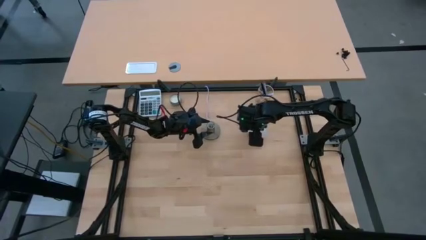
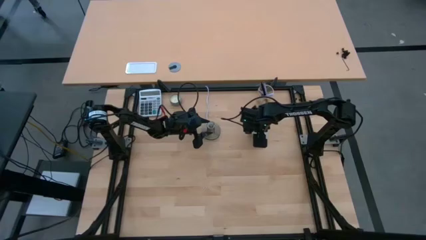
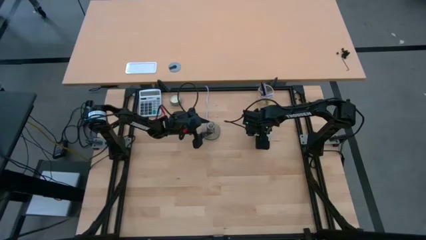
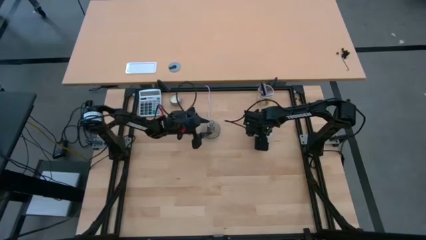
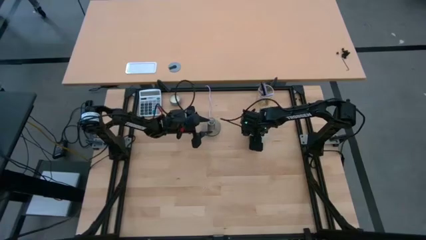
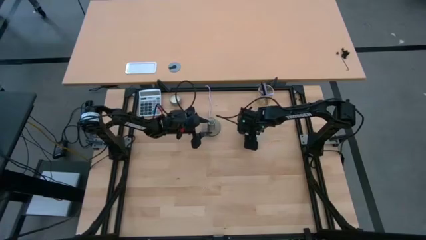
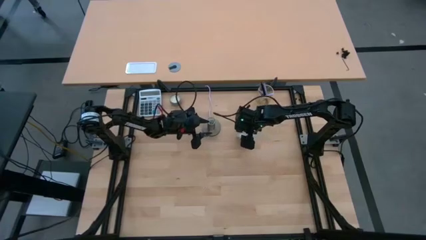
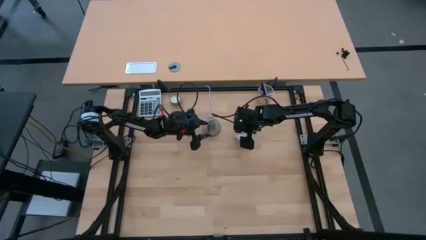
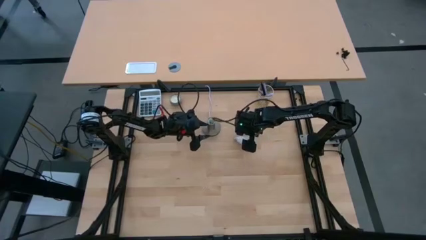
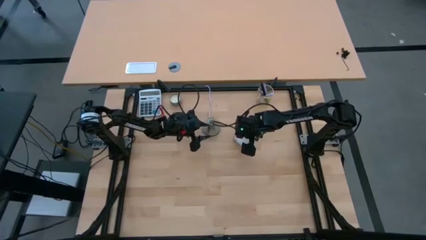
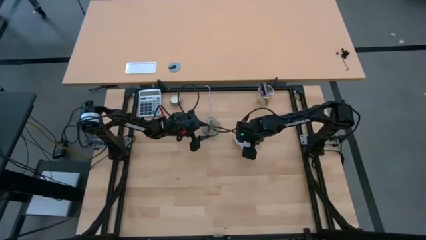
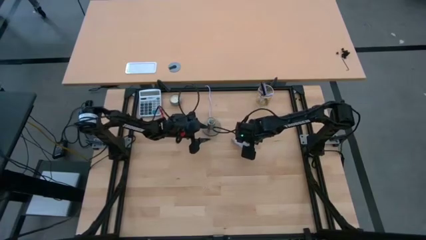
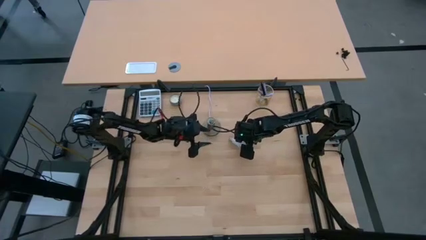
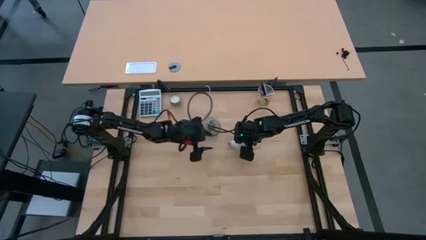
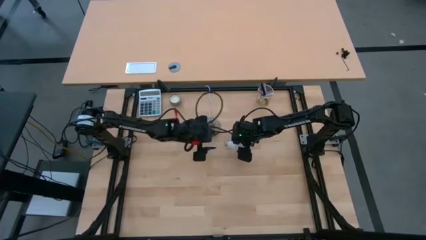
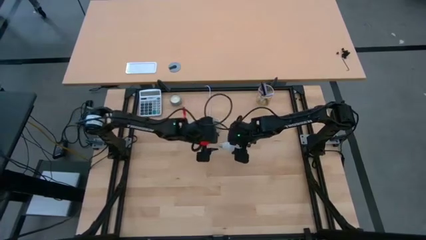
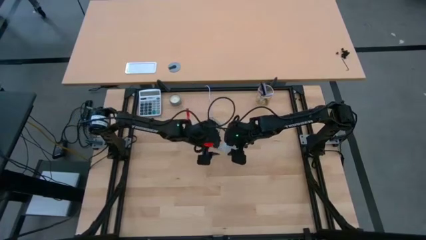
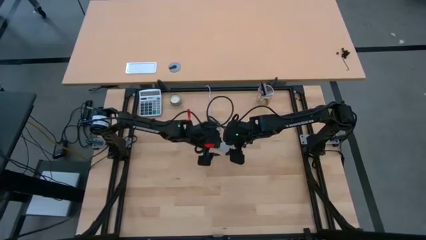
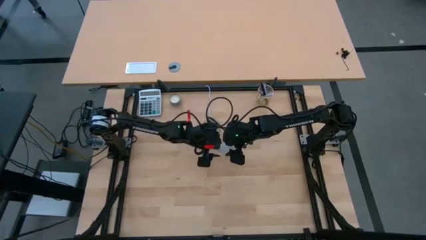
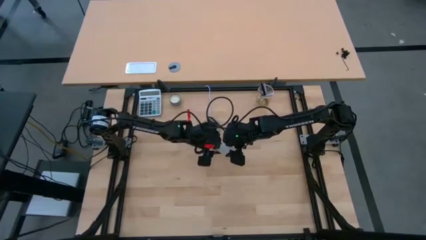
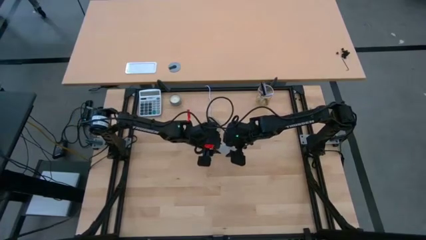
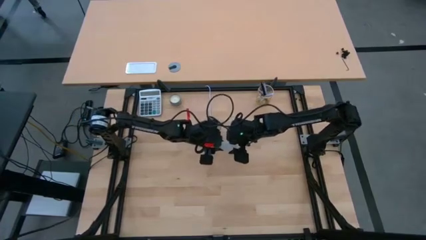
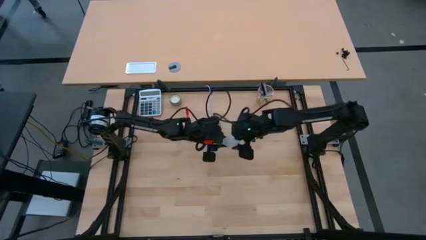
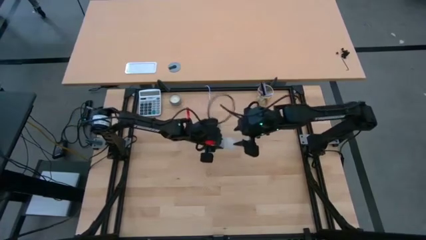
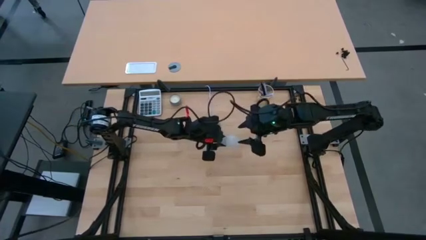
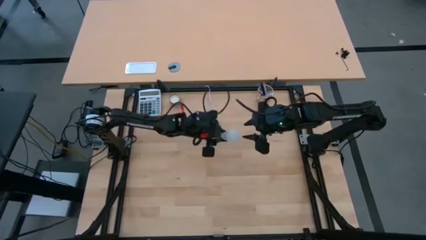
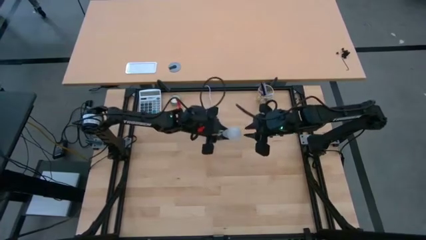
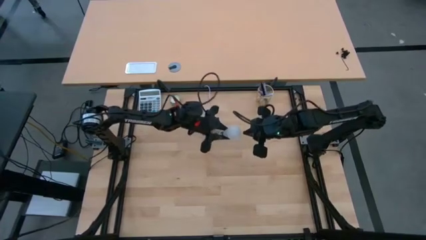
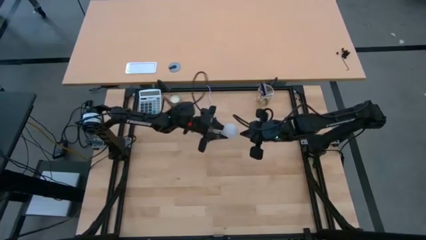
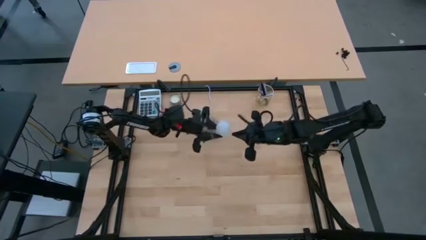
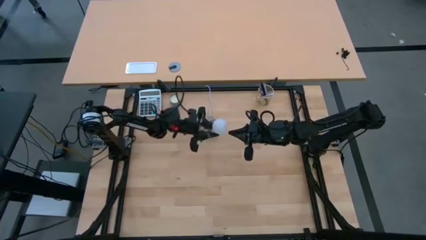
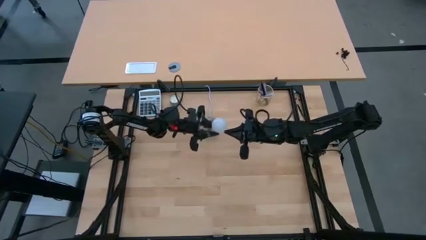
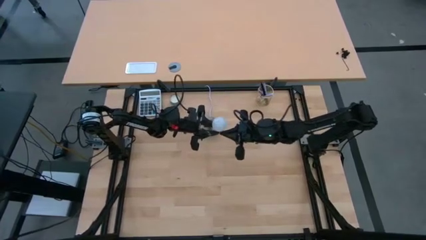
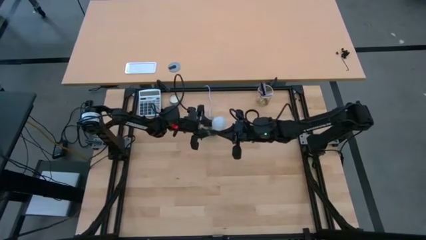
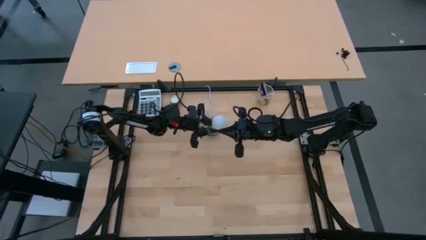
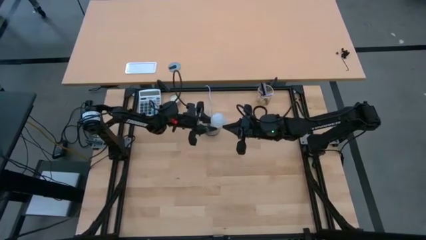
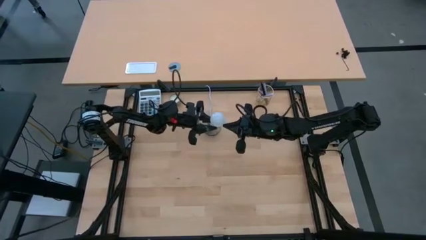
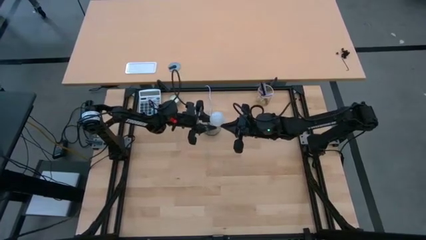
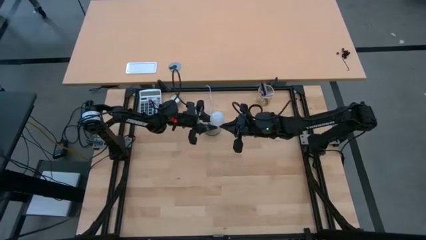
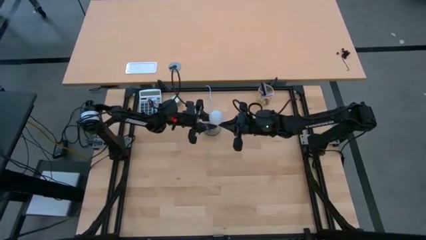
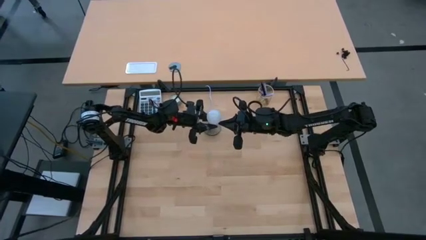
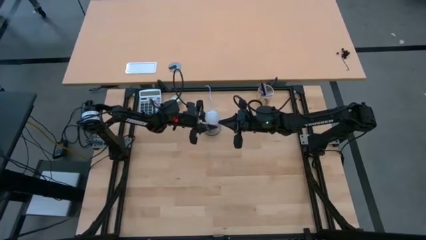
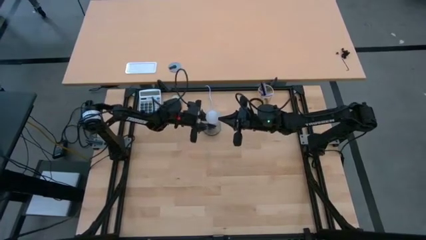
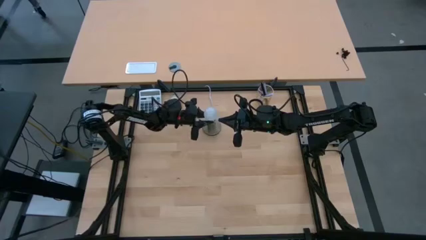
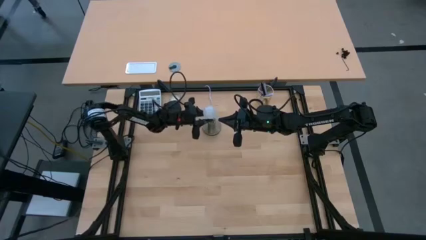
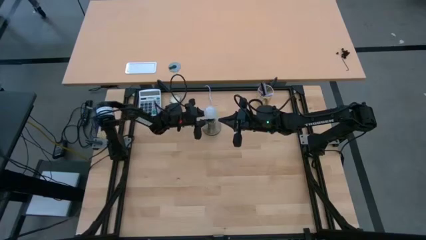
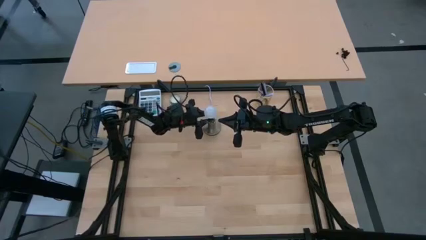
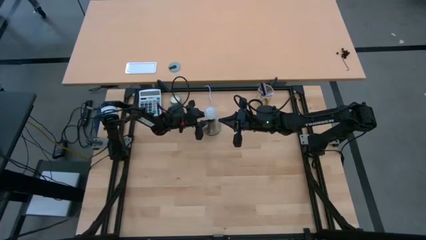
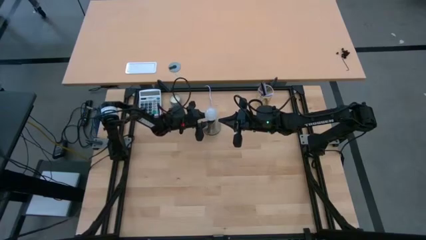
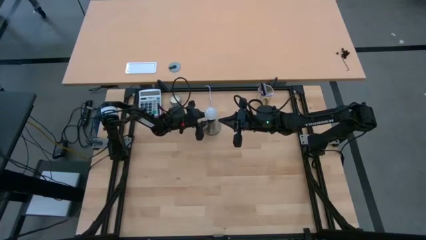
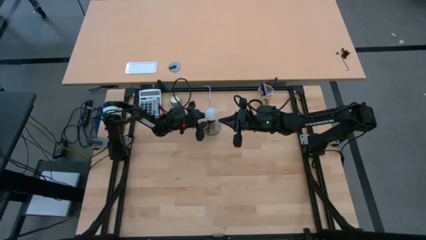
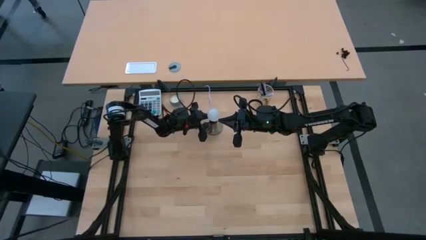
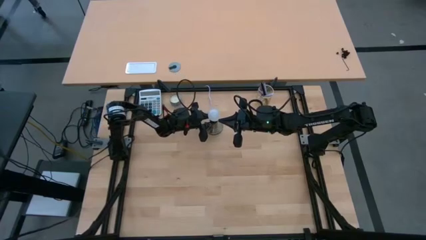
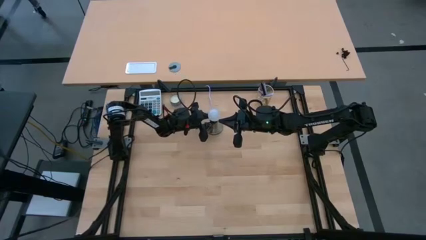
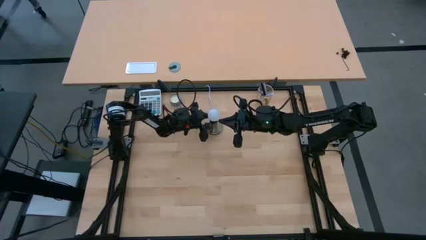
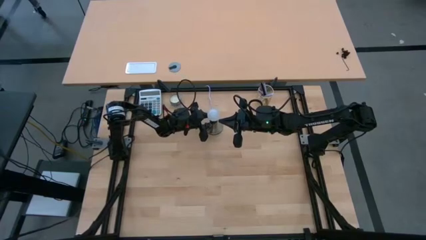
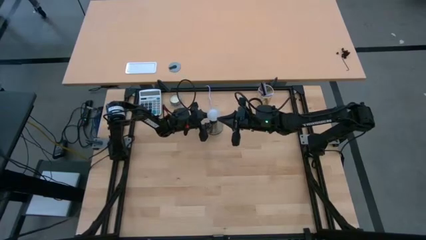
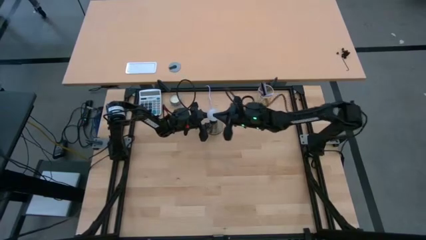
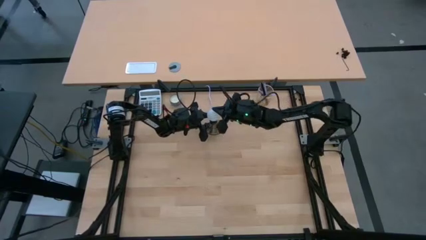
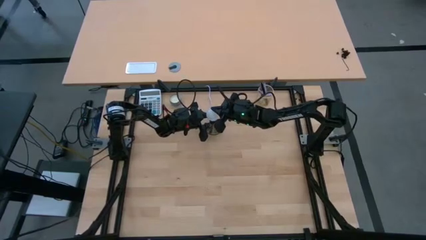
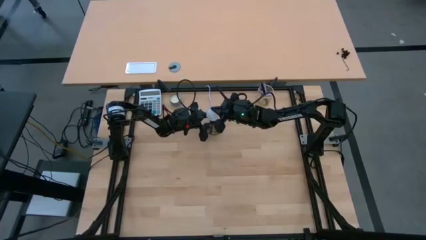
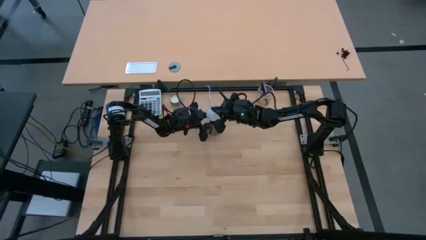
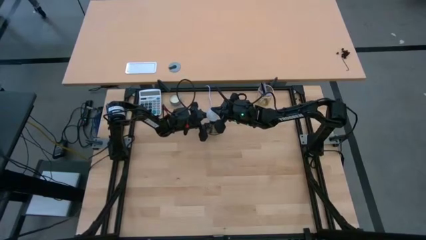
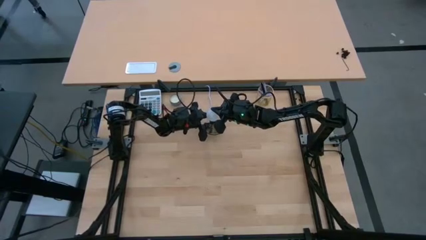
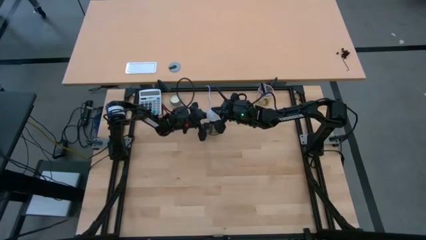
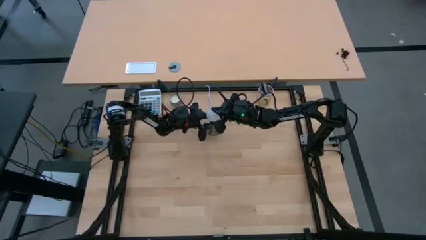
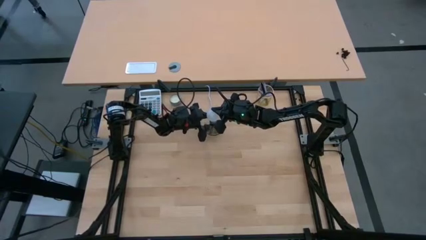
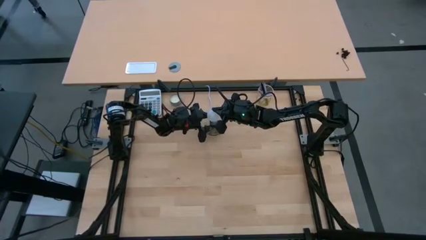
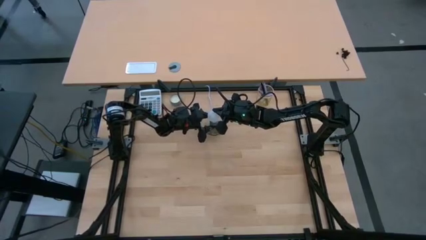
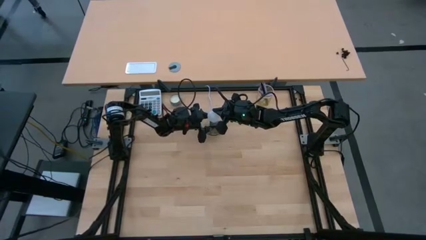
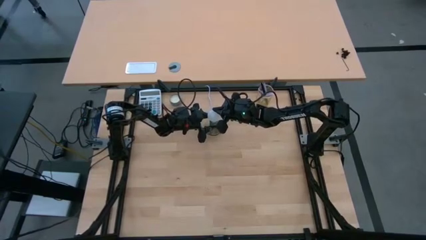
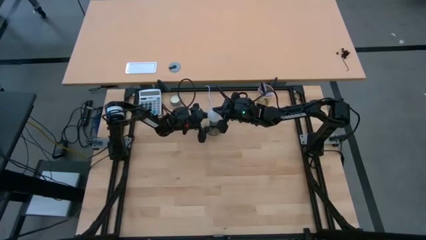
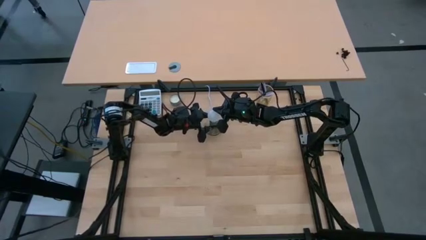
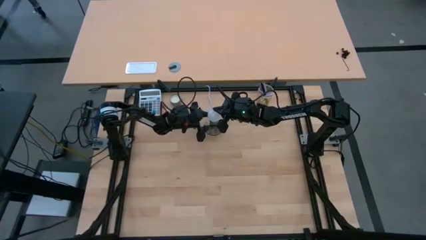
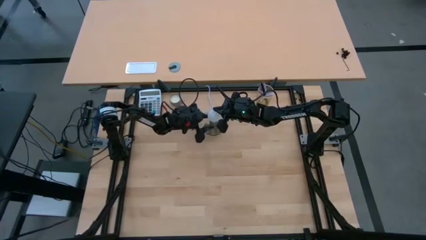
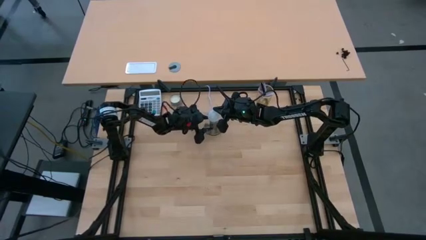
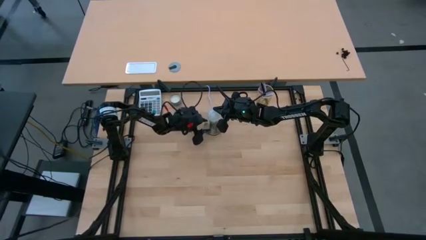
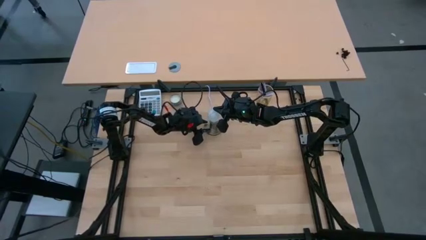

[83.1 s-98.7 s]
Task: Screw lightbulb
Insert the lightbulb into the lamp

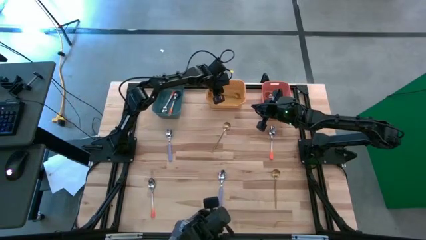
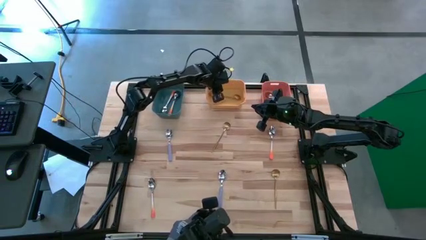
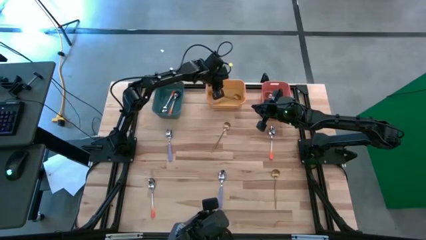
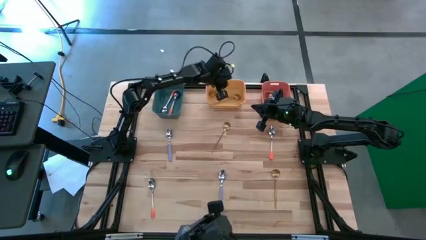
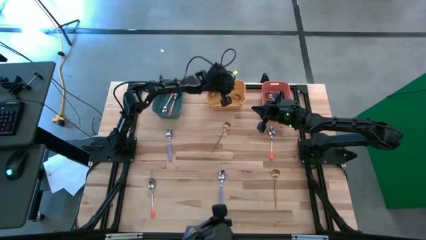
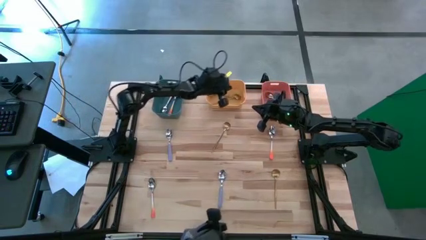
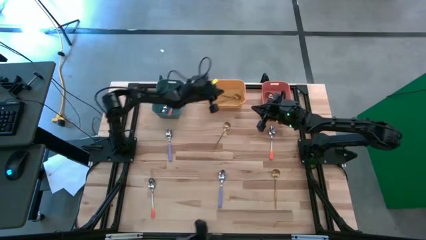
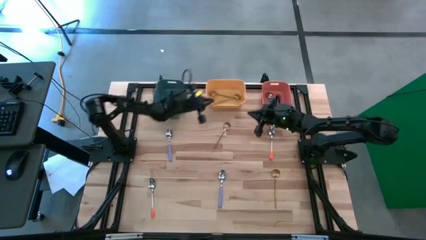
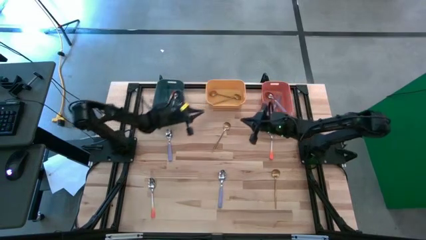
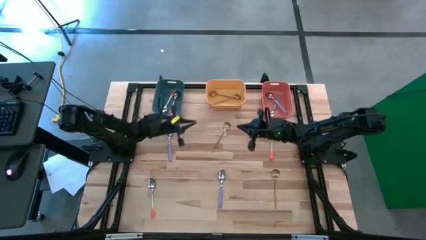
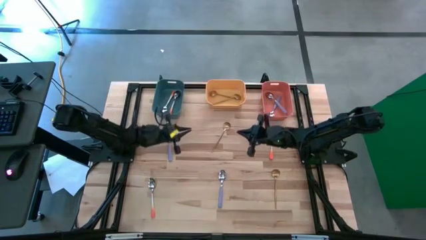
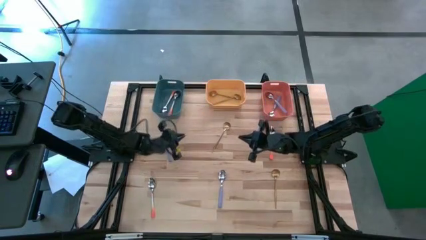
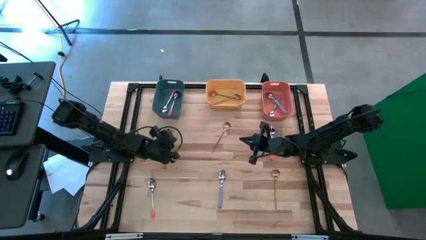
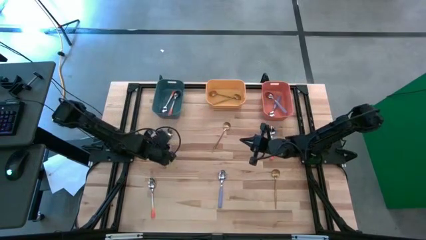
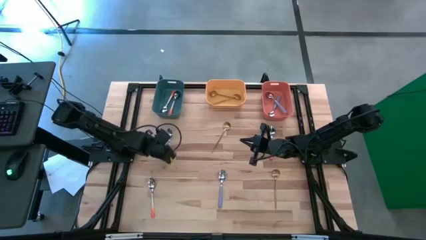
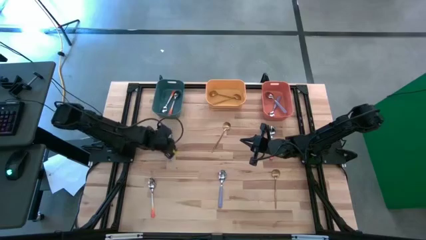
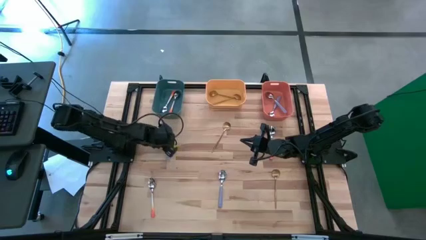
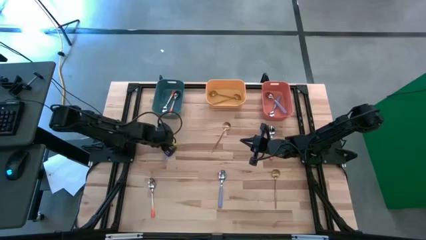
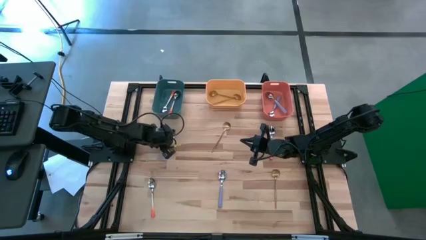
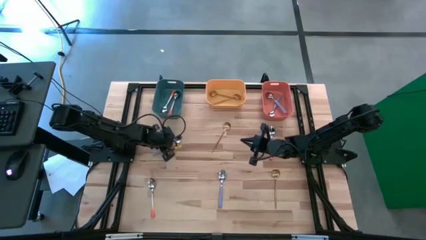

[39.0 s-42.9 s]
Task: Sort silverware by color (type)
Put the left purple spoon into the orange bin
